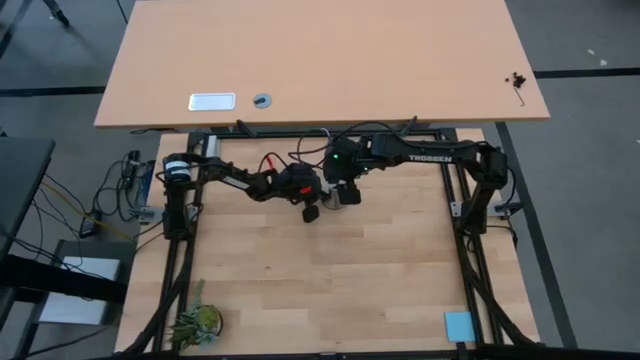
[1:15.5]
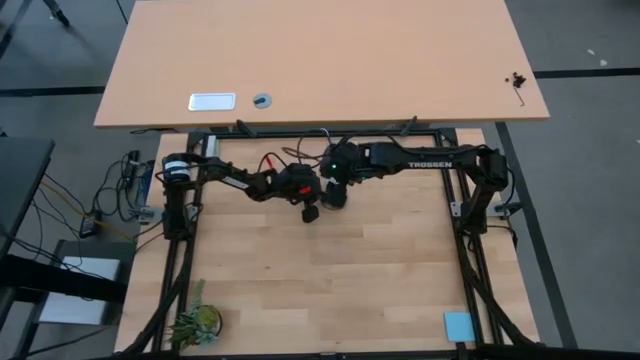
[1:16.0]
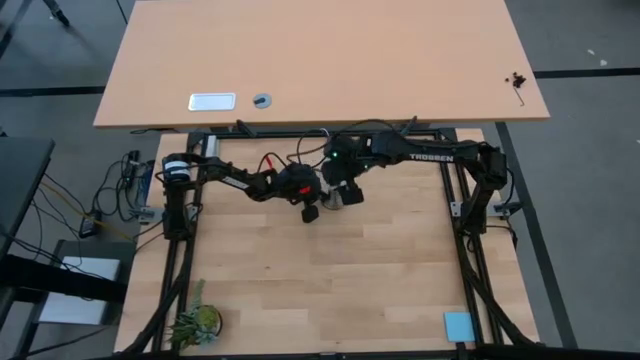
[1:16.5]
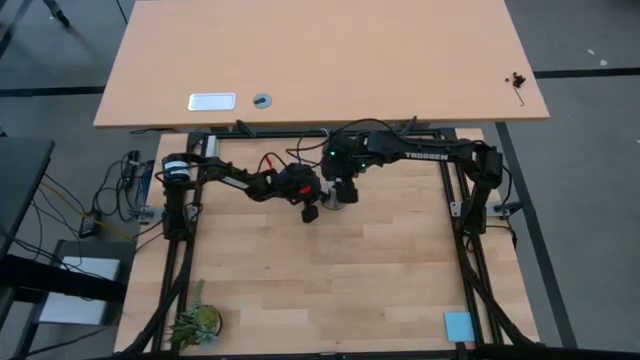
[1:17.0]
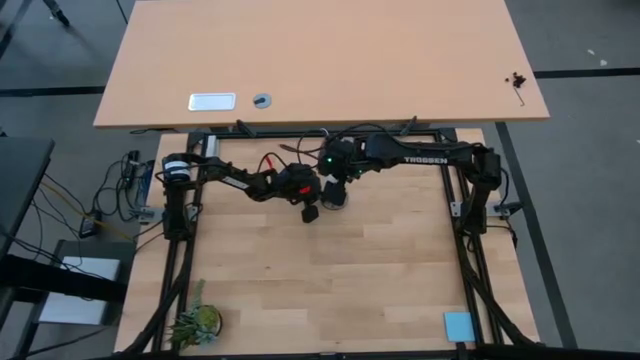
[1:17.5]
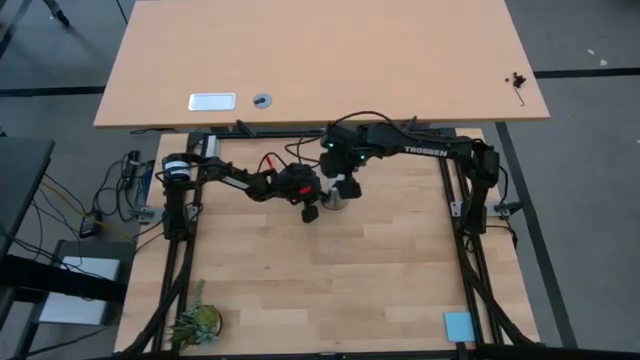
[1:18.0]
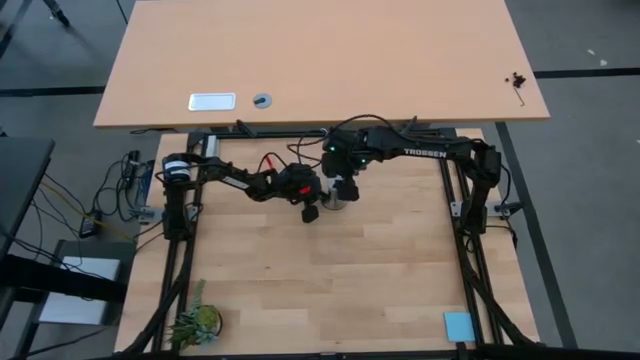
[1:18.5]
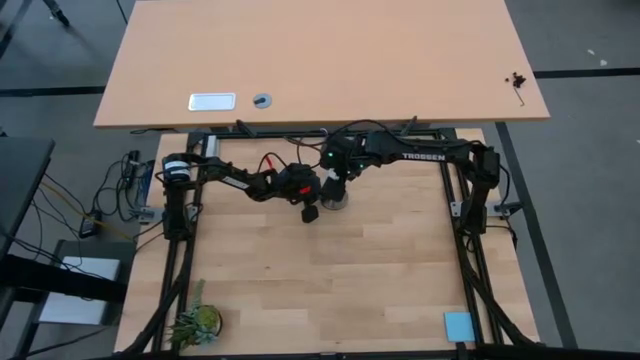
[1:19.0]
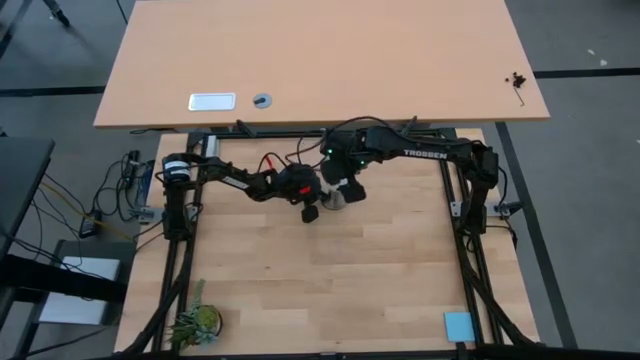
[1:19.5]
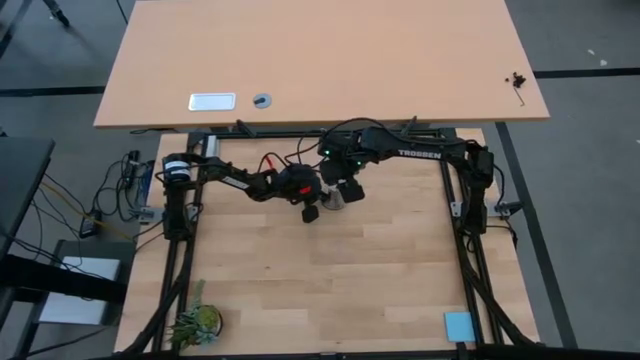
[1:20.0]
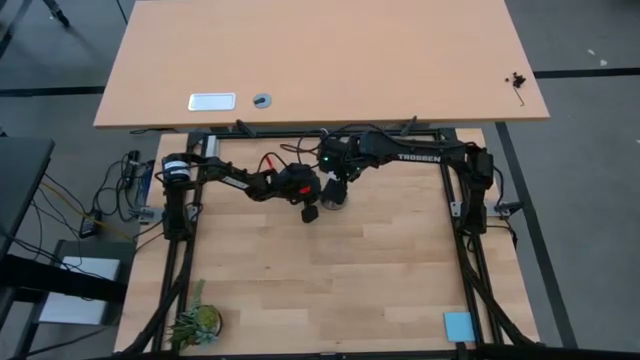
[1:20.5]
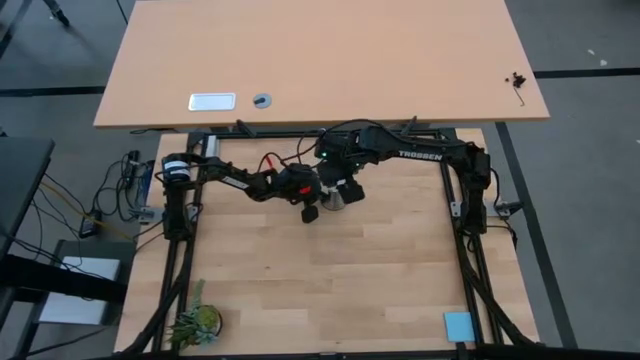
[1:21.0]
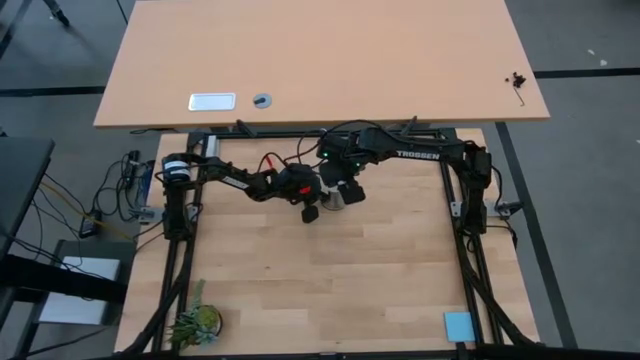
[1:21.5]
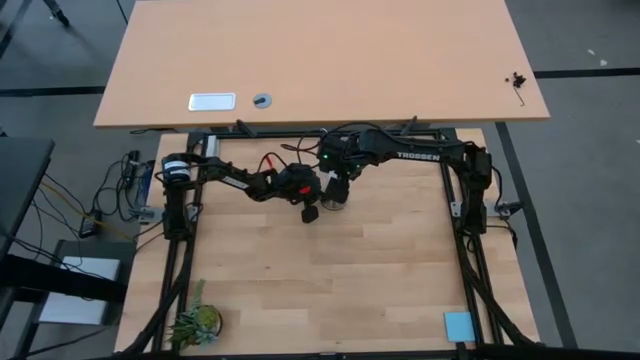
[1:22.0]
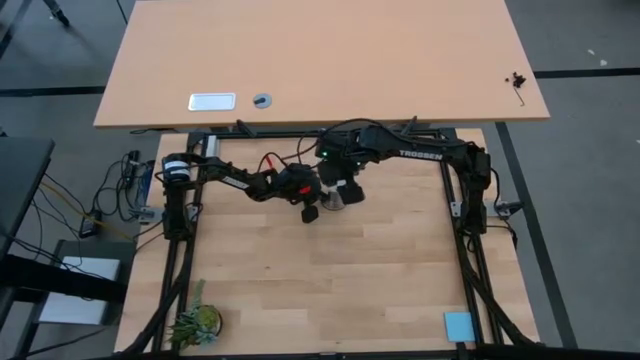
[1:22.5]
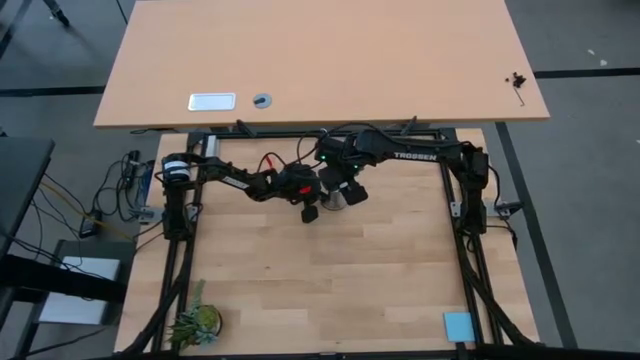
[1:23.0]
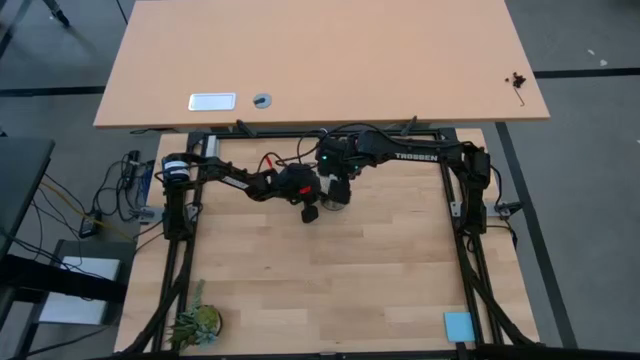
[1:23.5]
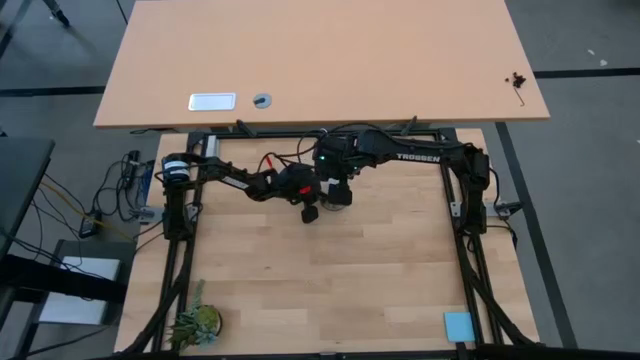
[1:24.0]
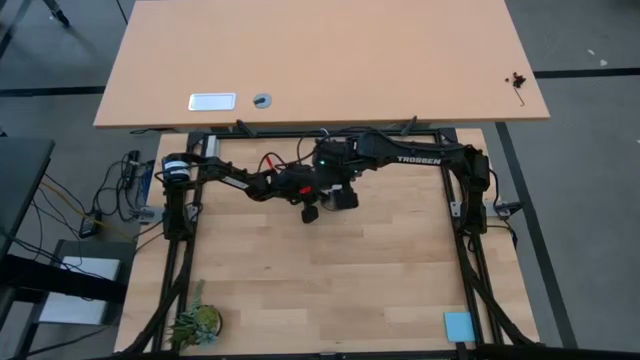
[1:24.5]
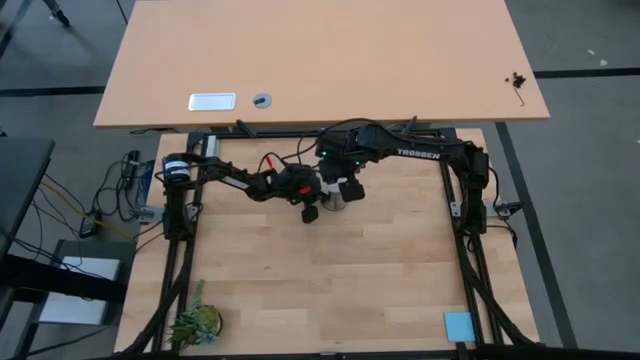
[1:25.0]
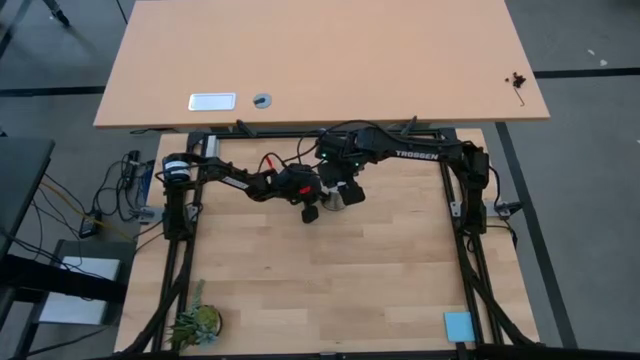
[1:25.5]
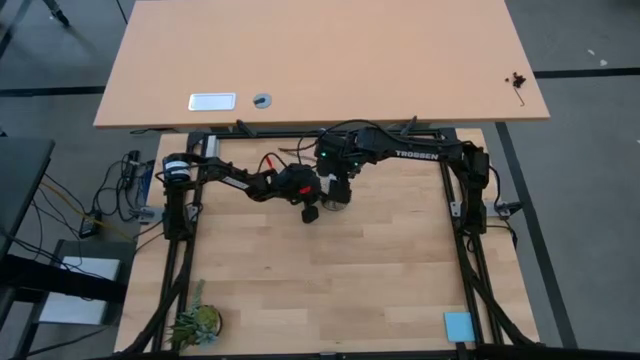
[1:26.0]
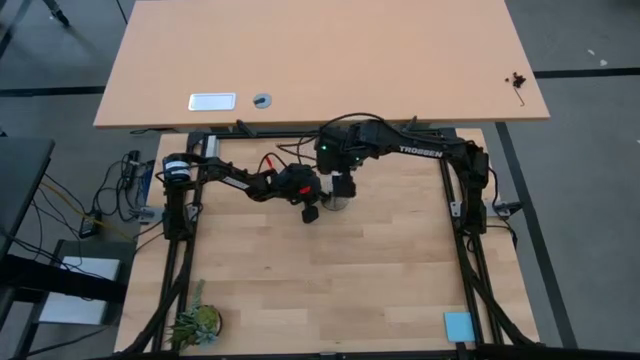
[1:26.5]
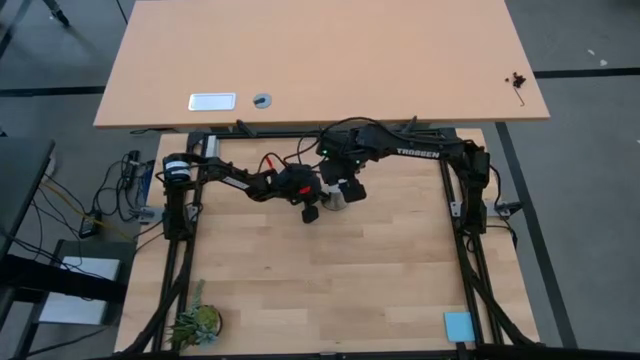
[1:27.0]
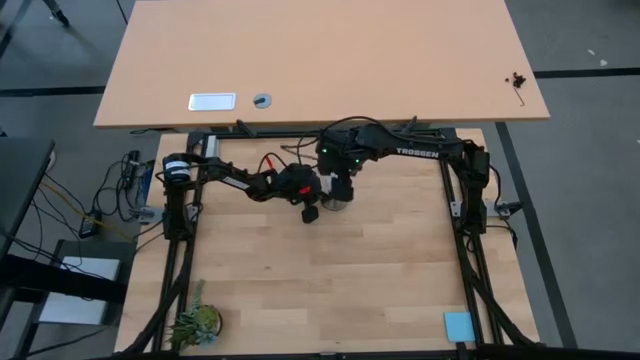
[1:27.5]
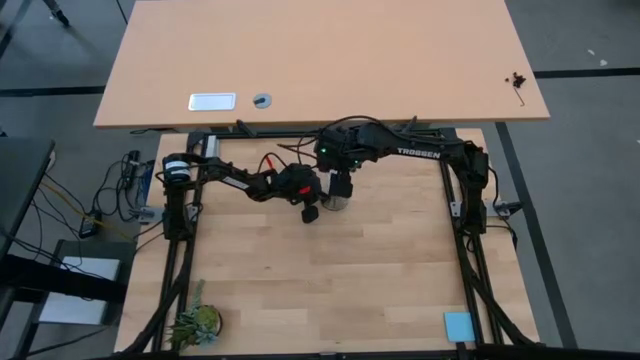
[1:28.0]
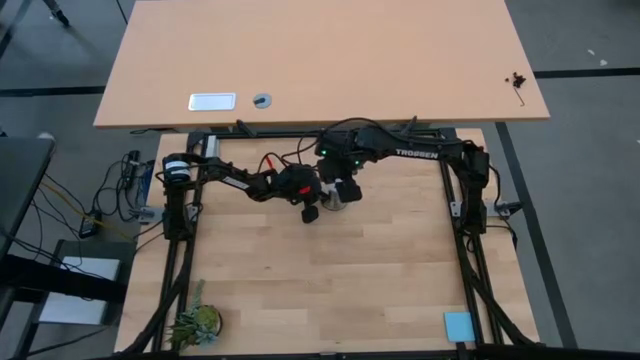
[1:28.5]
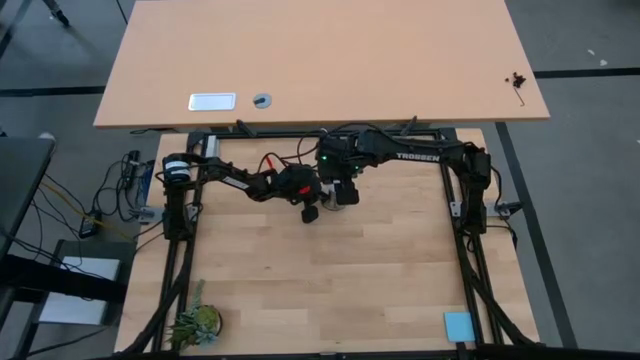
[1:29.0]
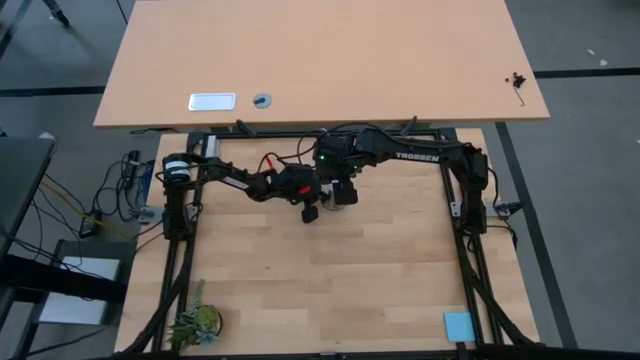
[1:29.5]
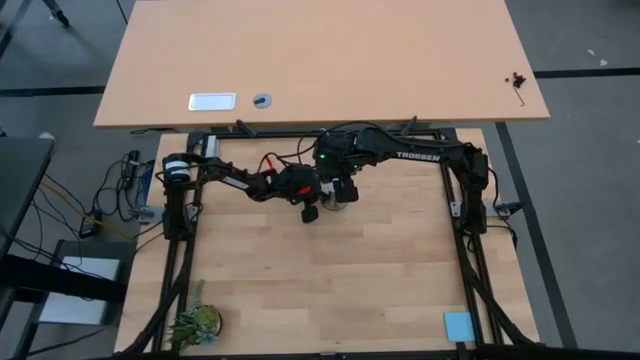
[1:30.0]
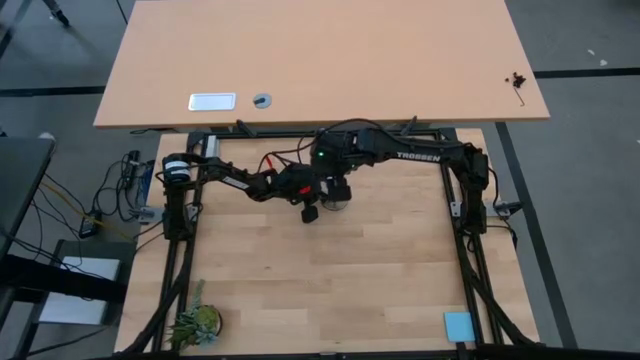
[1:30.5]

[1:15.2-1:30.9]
Task: Screw lightbulb
Insert the white lightbulb into the gold lamp

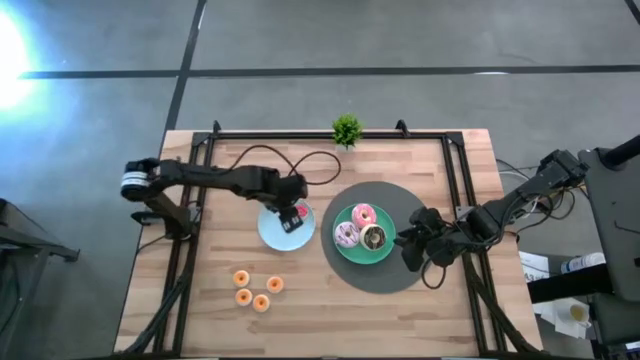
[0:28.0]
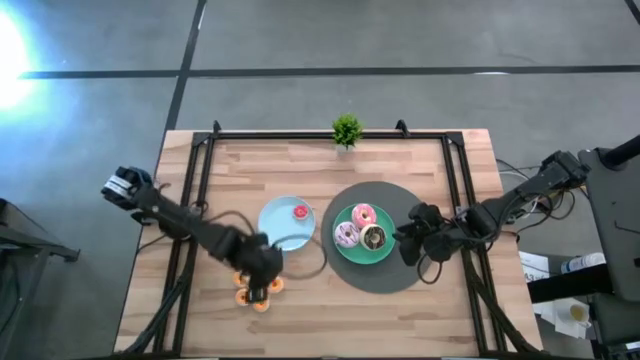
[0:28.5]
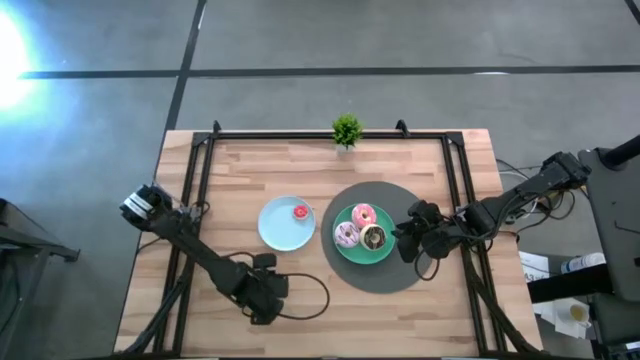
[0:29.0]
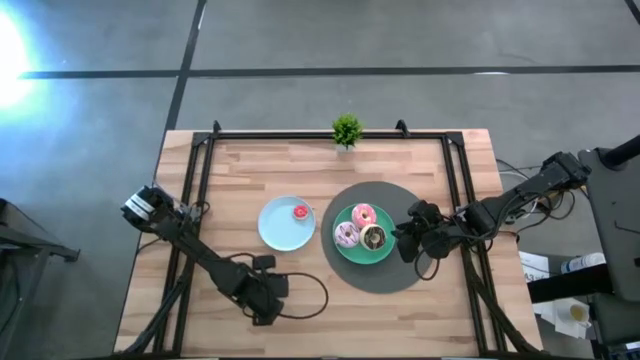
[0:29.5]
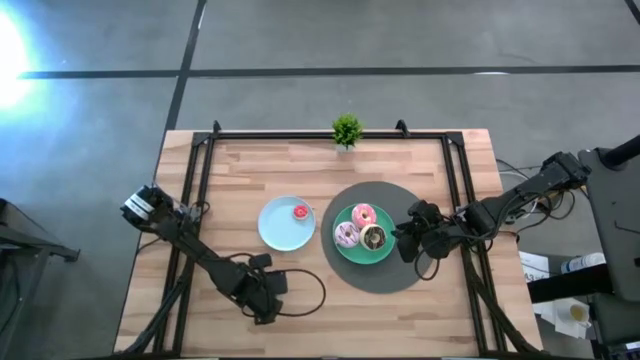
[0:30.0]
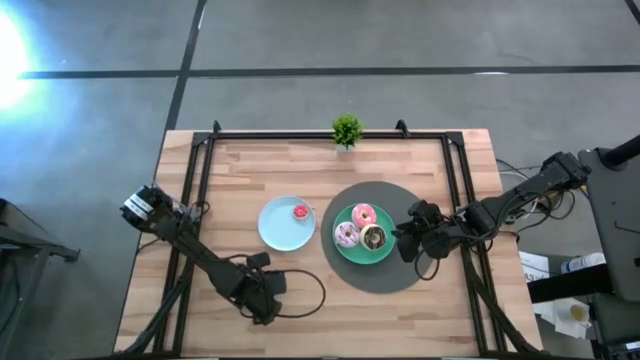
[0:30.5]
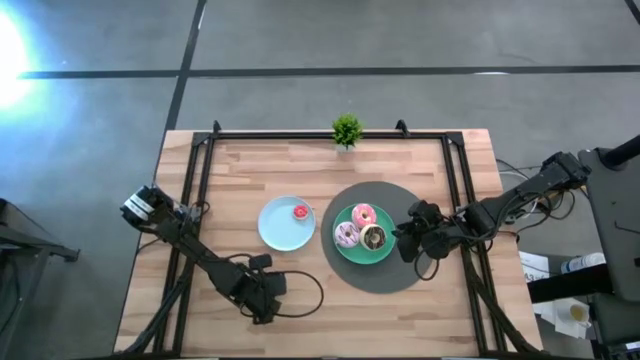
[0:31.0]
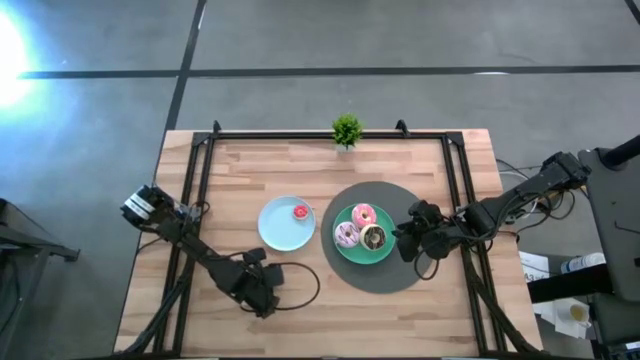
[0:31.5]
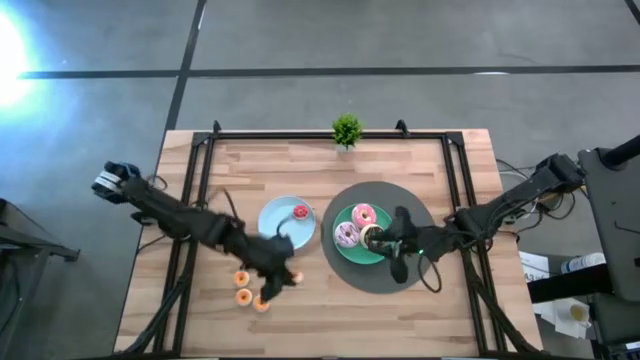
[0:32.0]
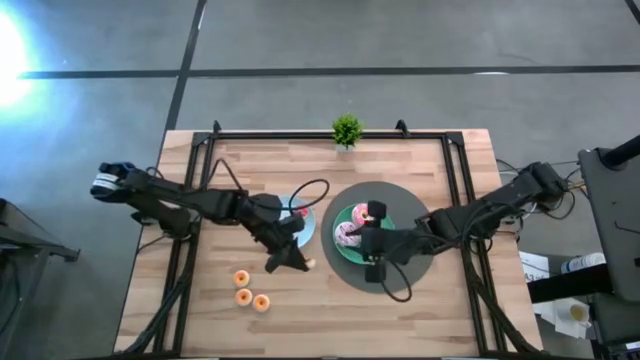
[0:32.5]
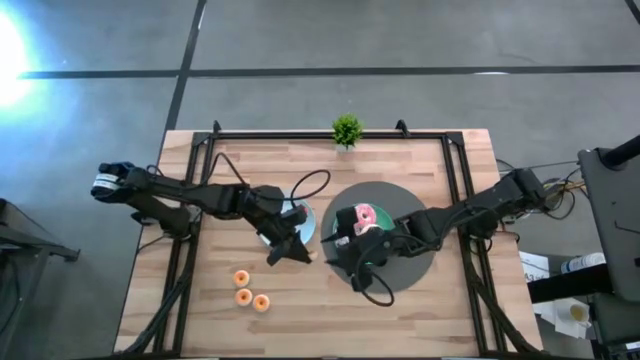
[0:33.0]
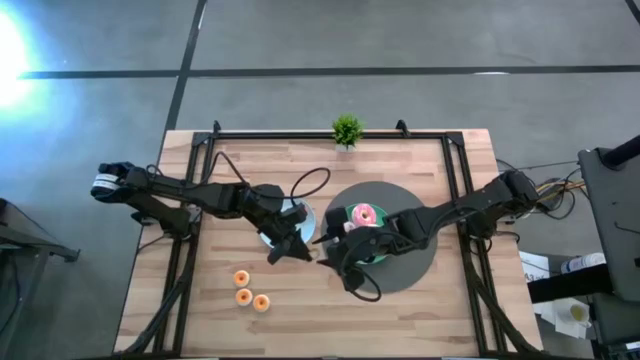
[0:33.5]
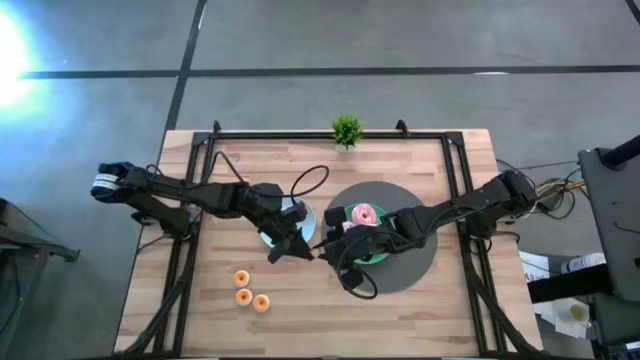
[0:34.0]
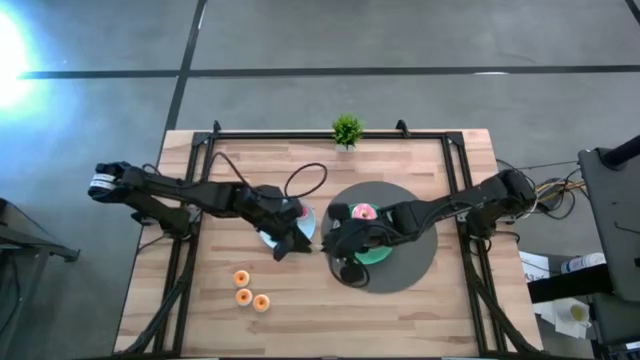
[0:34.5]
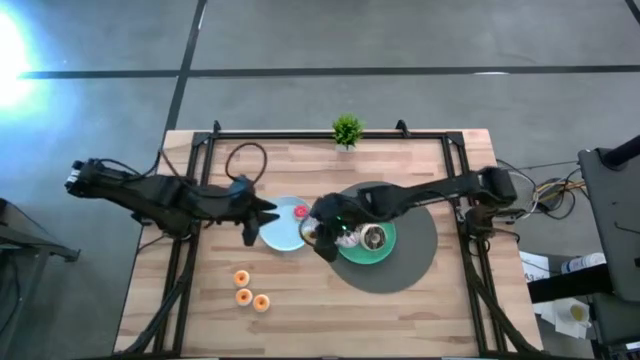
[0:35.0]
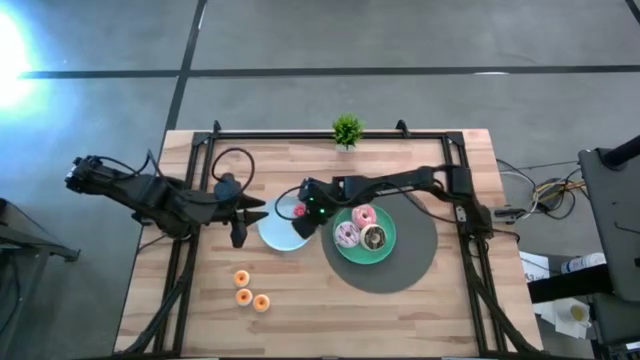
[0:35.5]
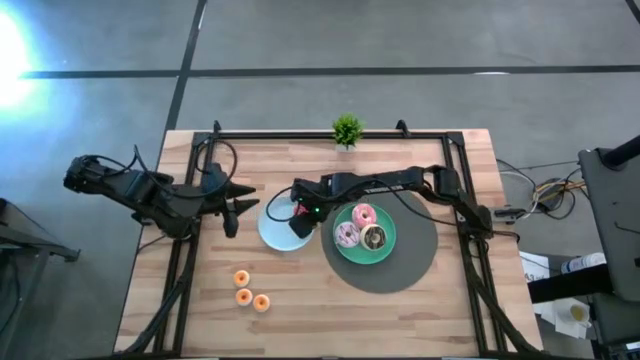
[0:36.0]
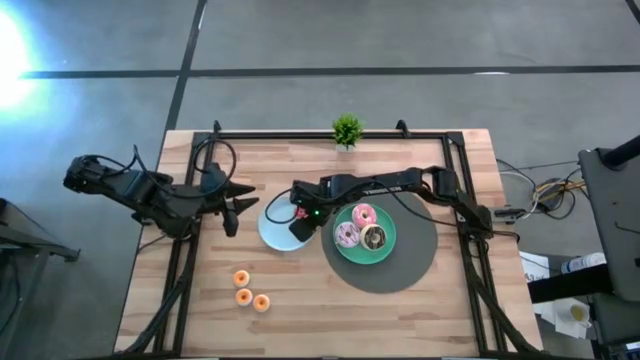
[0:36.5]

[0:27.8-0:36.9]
Task: Pick & Place donuts
Put the small yellow donut on the light blue plate
